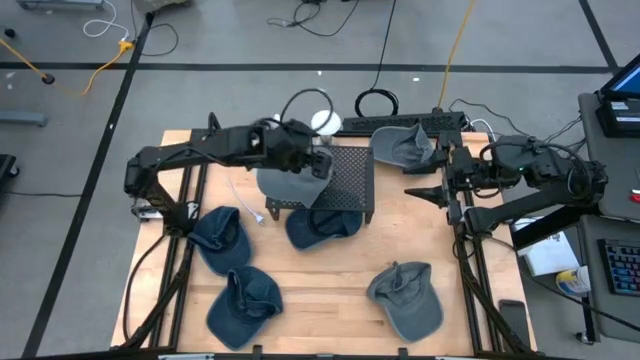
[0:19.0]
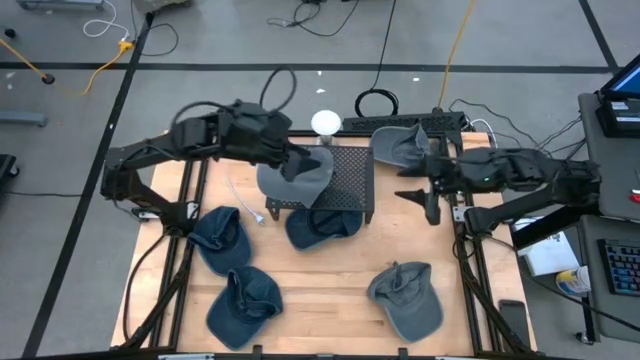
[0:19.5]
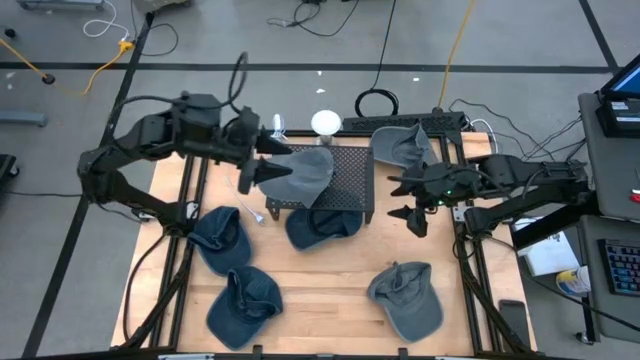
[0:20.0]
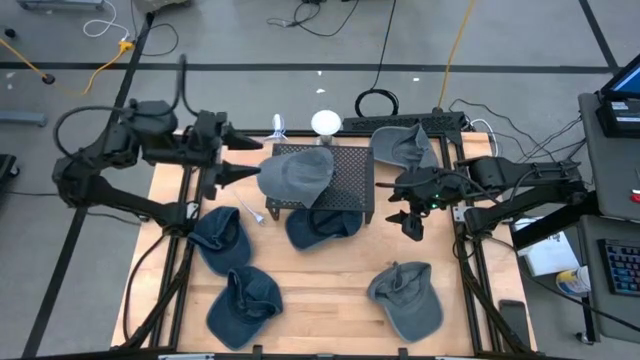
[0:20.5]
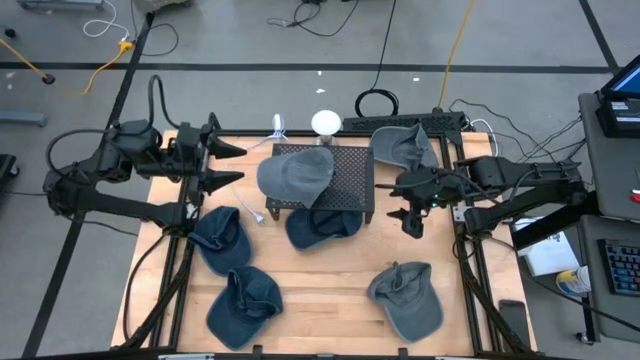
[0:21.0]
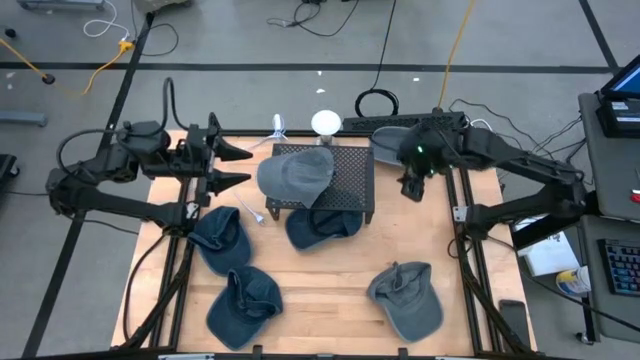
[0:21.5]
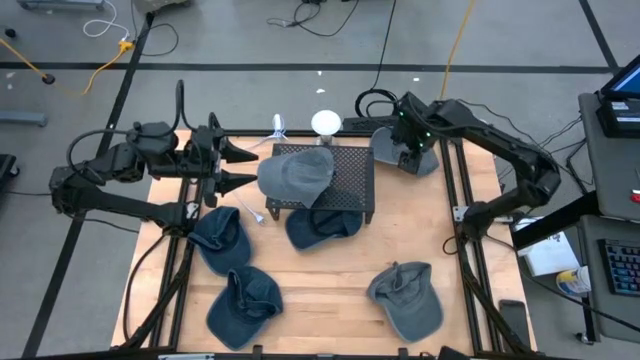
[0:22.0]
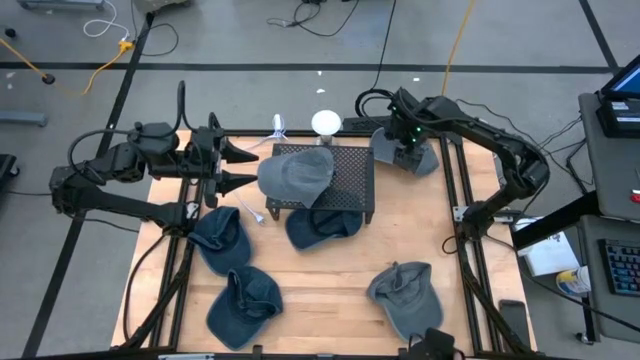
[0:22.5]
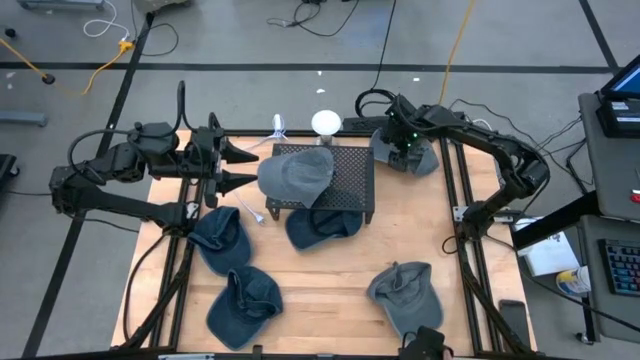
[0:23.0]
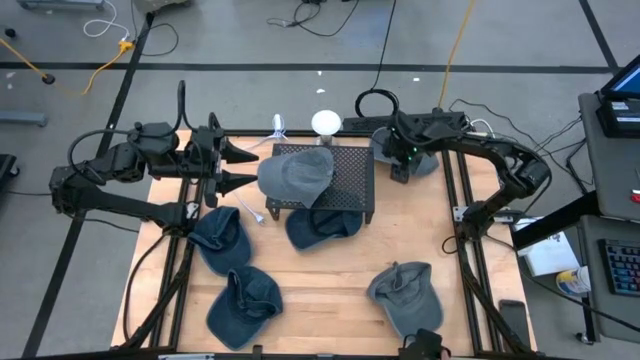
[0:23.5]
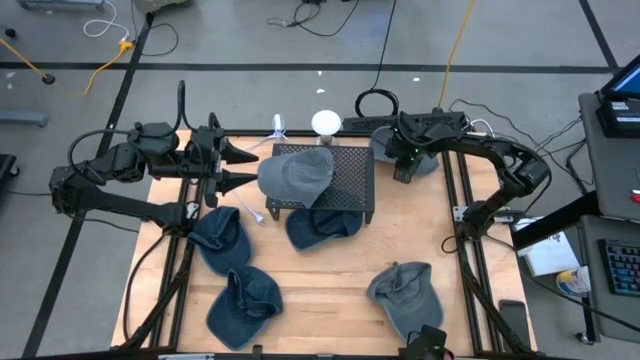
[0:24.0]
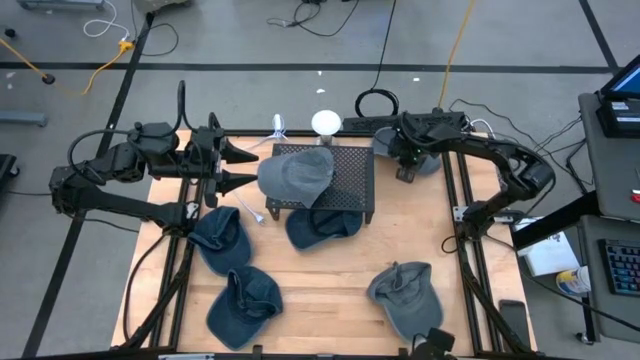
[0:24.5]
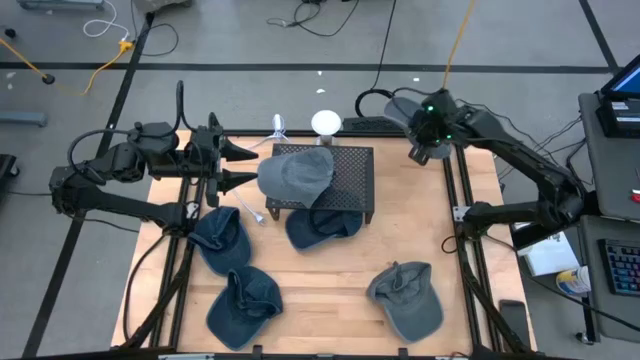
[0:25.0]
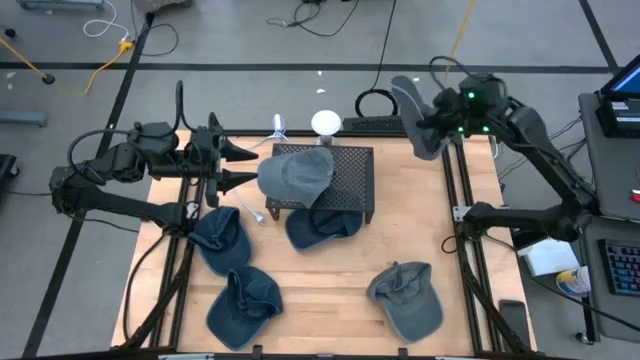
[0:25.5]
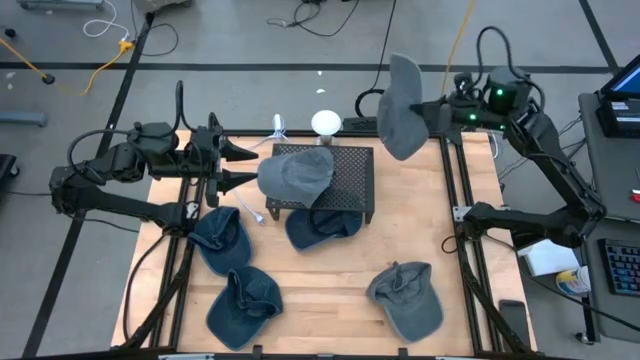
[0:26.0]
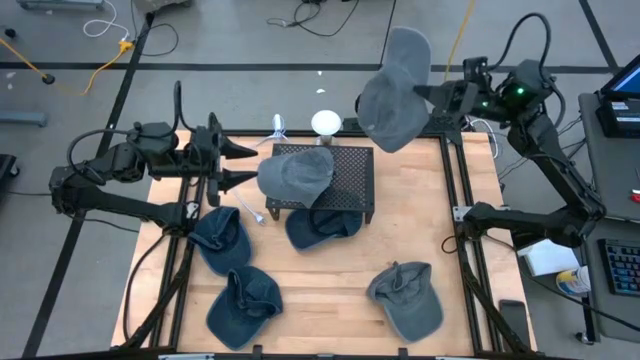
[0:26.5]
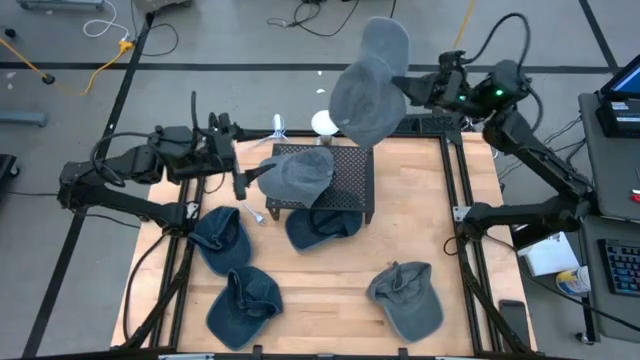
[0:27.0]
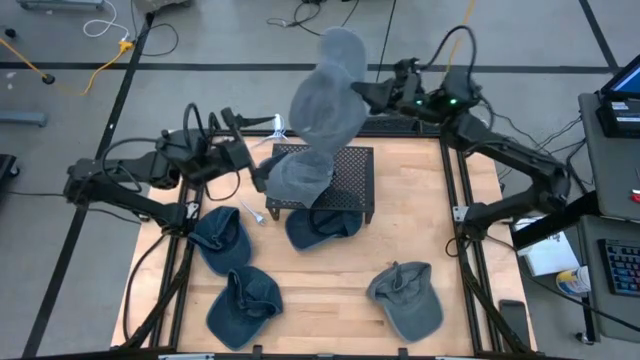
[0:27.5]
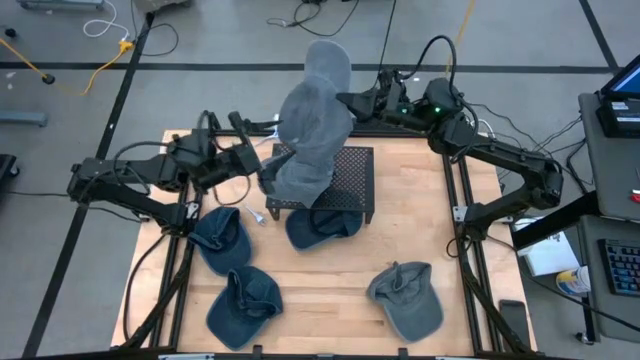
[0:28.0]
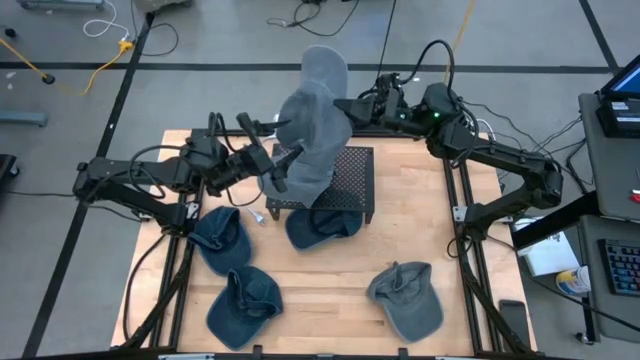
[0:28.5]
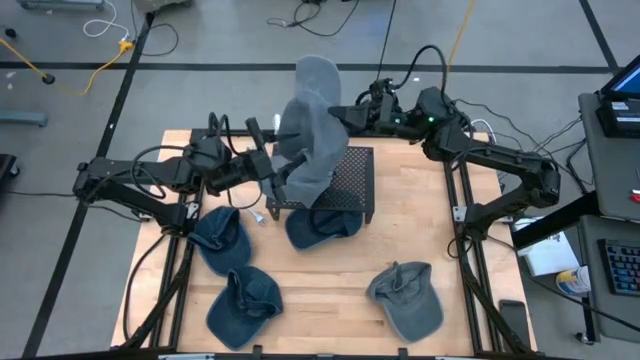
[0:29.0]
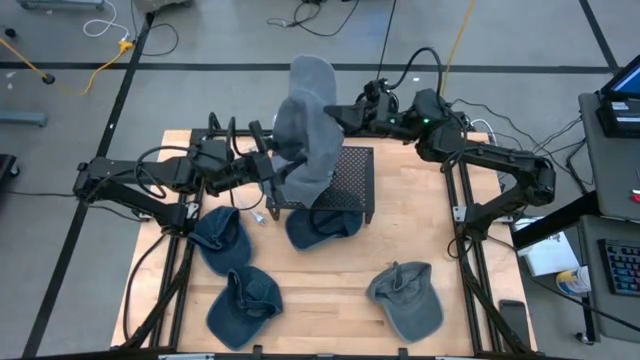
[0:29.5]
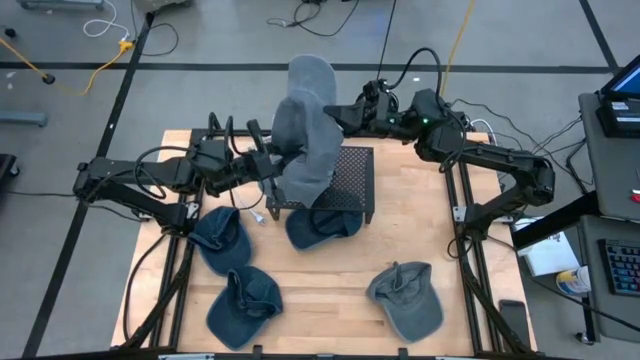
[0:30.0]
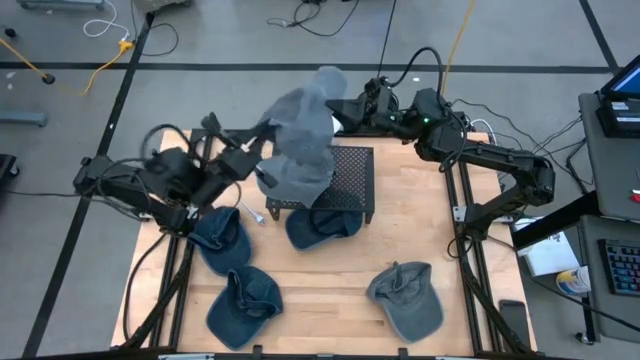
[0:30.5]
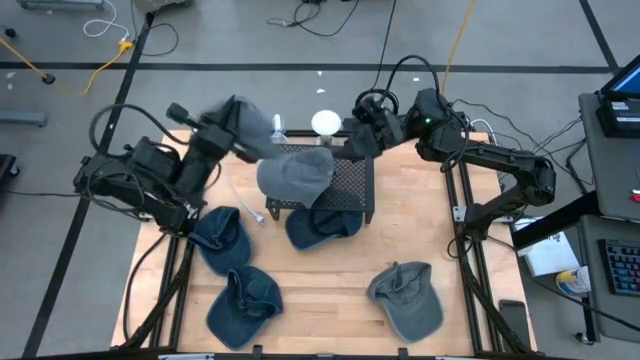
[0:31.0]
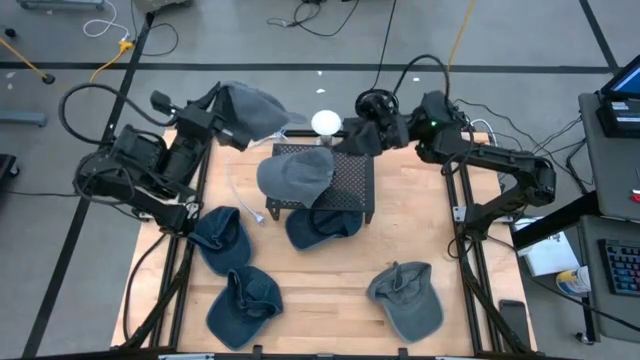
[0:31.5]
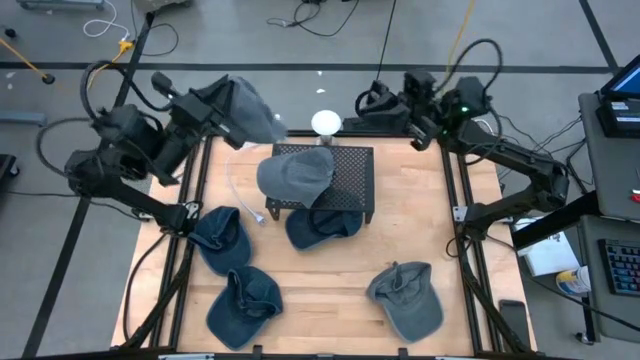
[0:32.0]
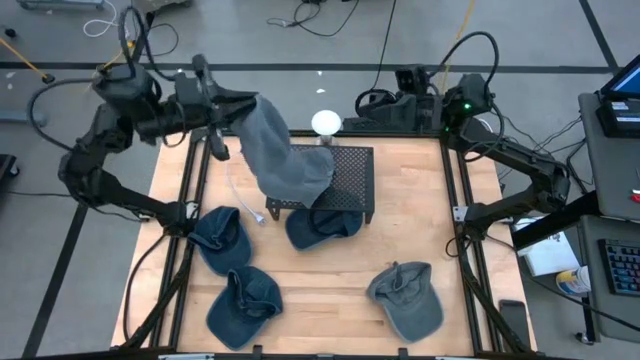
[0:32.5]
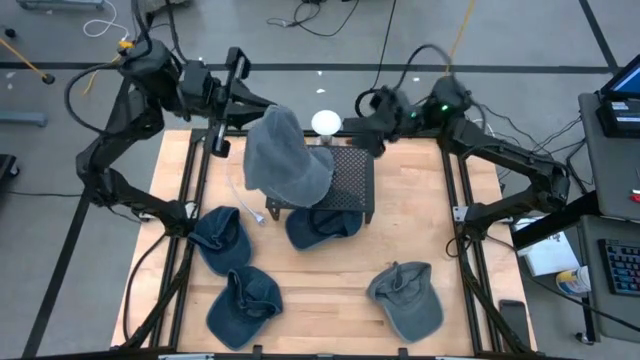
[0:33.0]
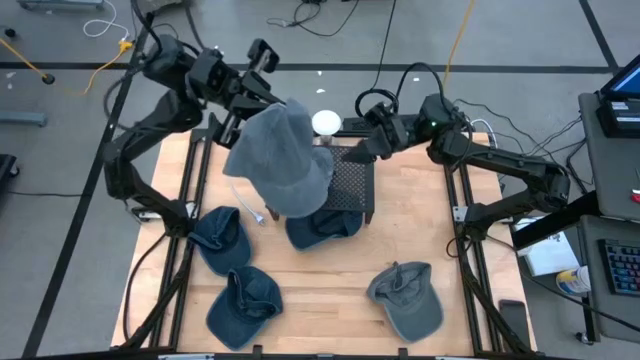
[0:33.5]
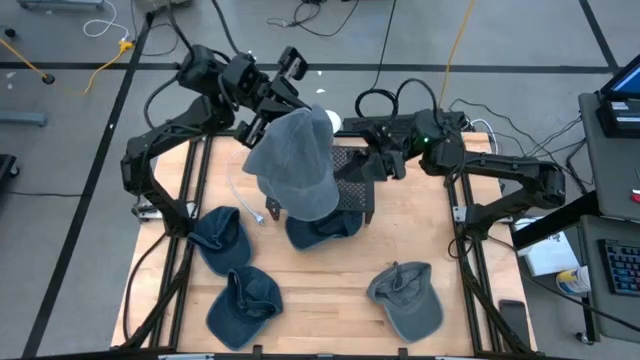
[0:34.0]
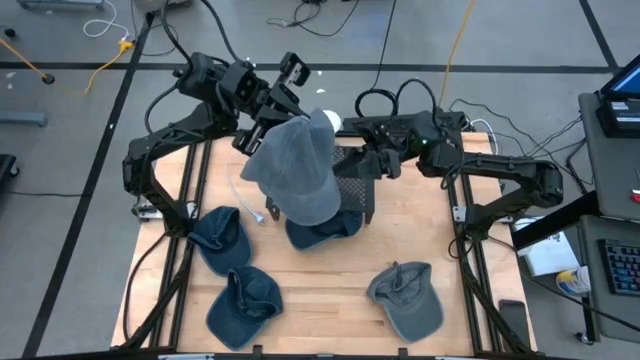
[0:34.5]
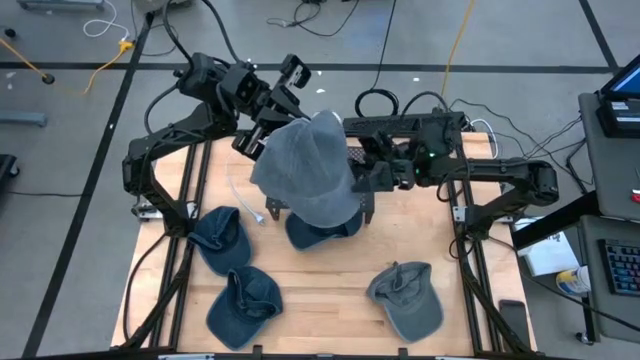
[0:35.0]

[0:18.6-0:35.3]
Task: Pick & Place hat
Stack the top gray cap on the gray cap on the shelf
